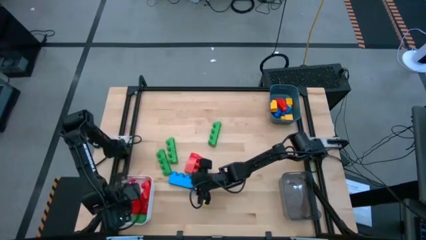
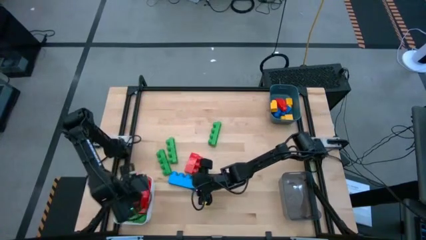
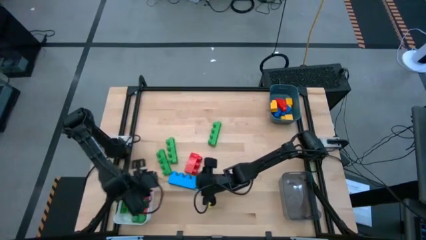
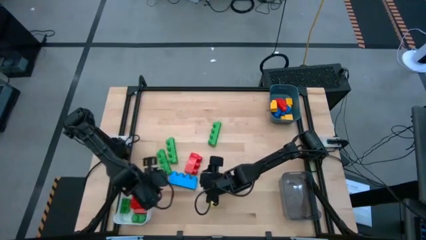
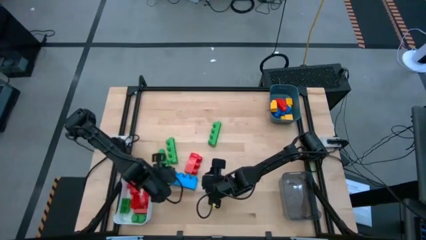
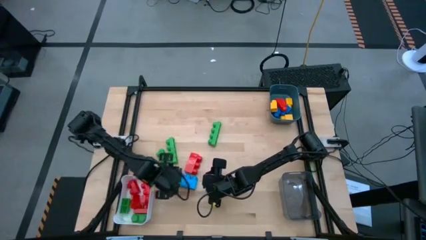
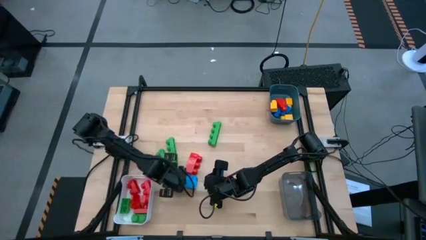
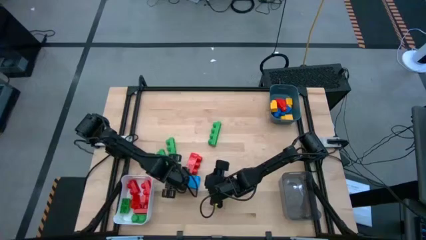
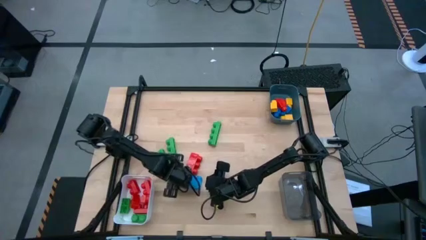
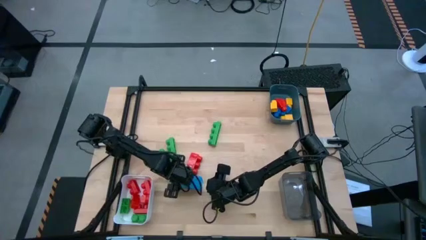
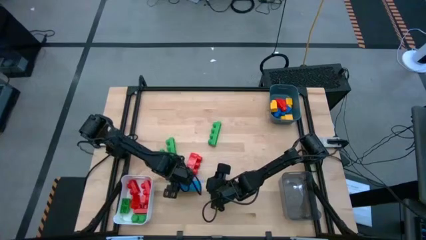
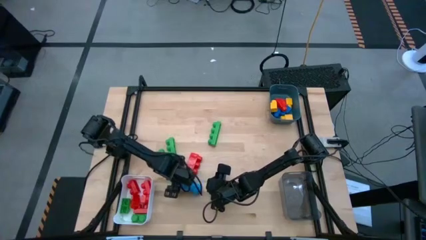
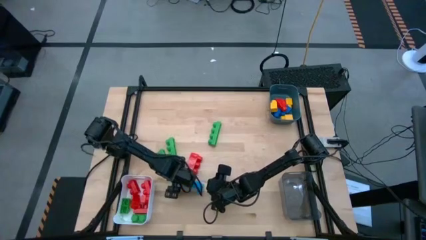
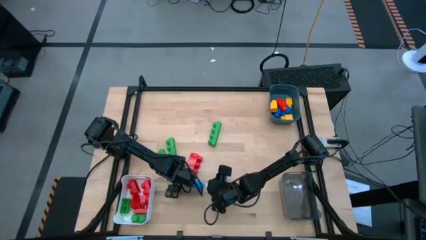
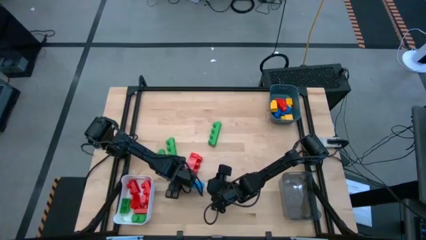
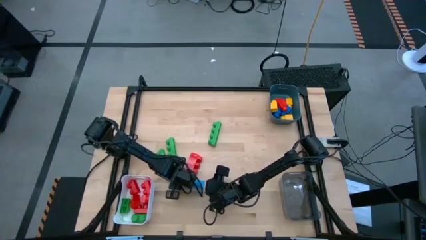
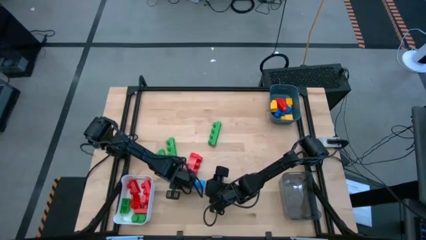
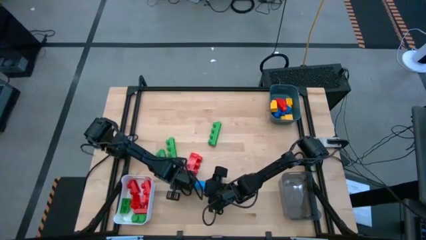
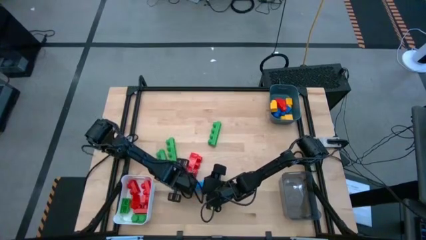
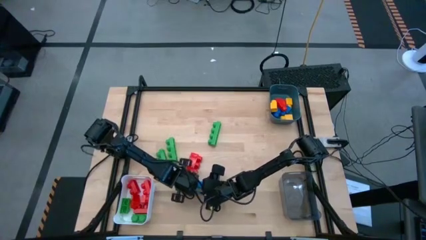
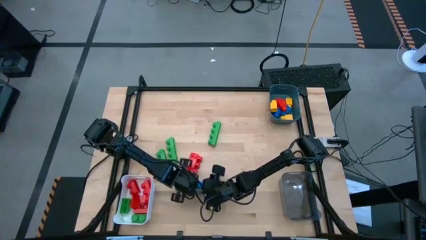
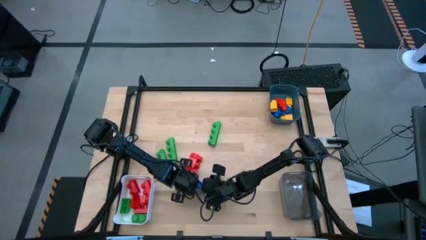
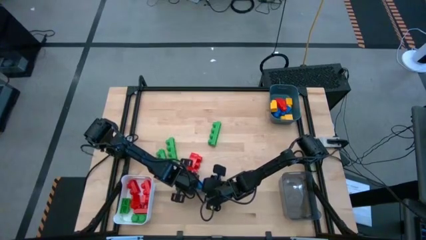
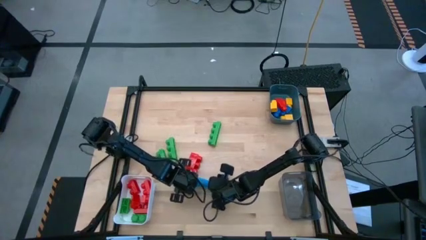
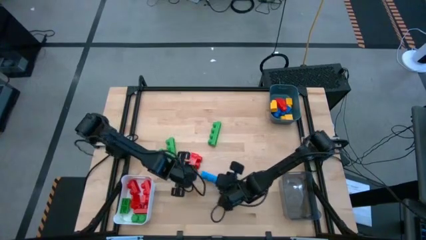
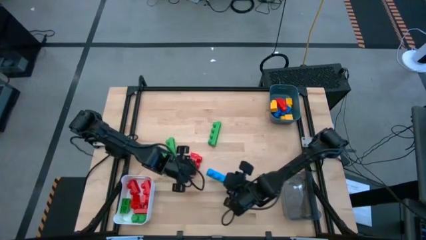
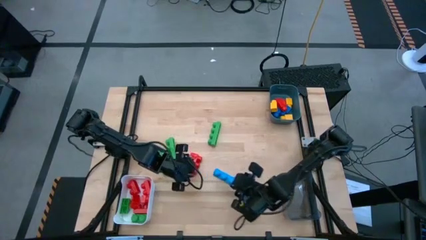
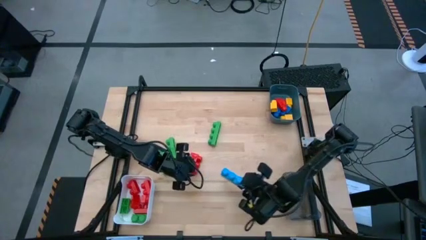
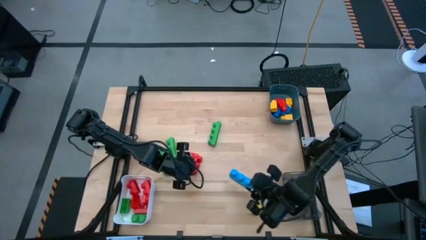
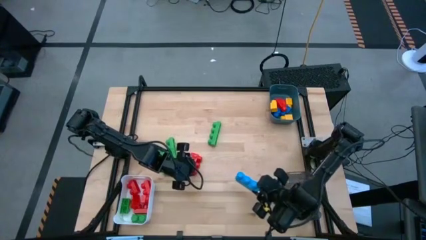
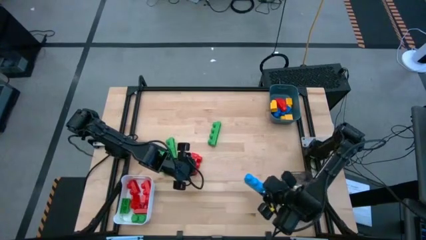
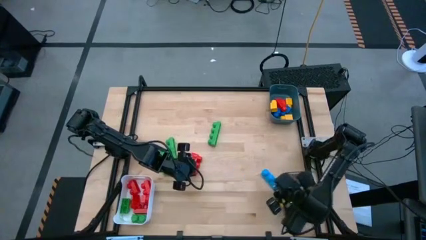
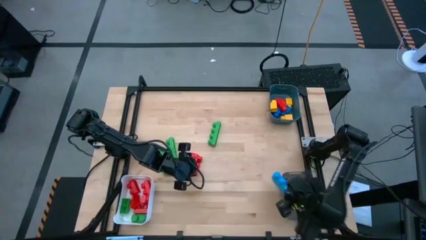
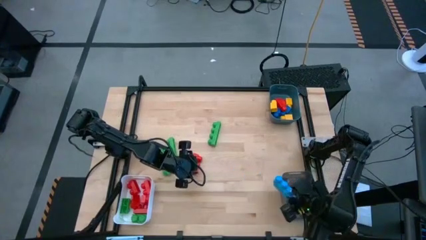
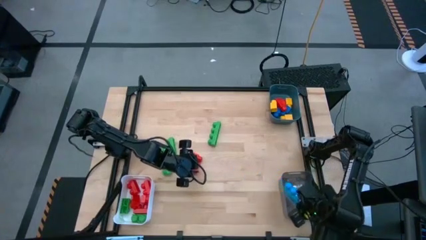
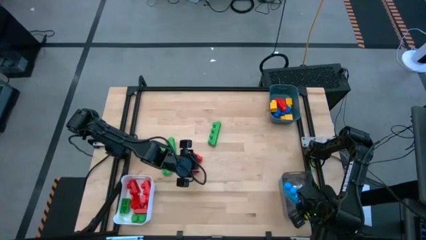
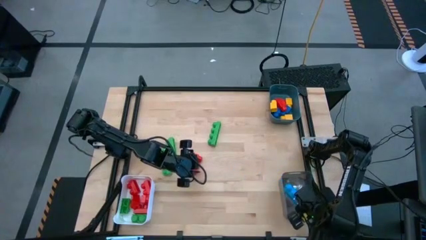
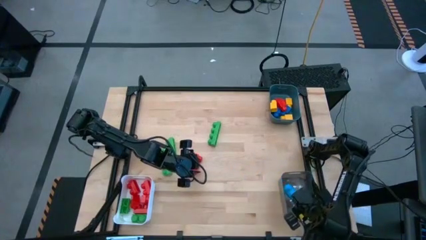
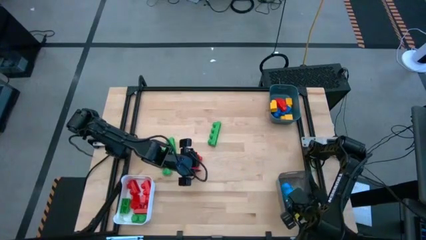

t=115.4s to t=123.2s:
Task: Sort blocks by size
Put the four stud blue game piece into the transparent black bin

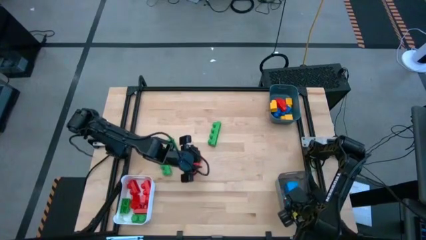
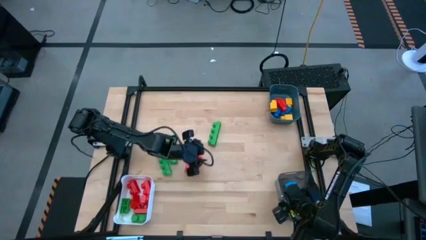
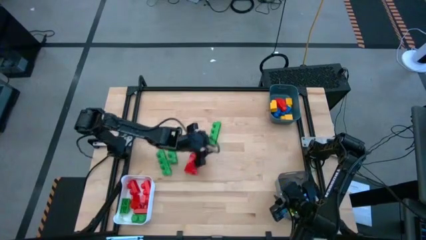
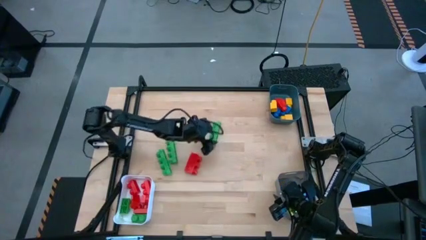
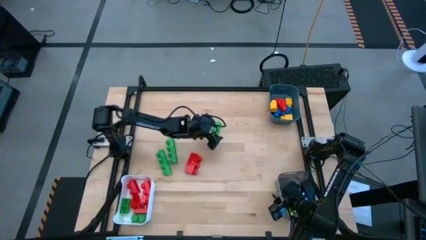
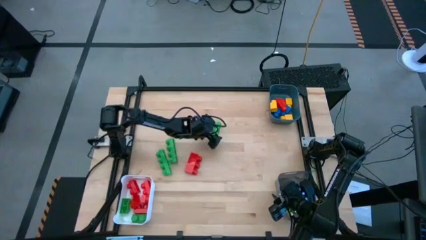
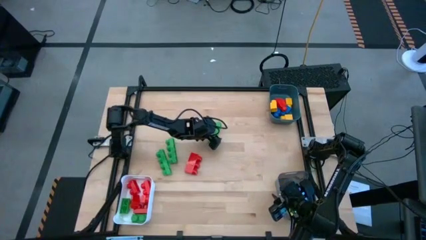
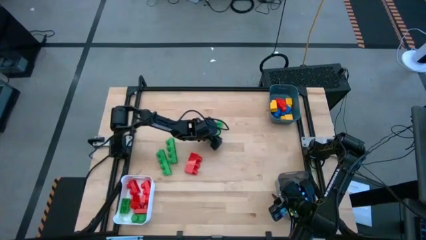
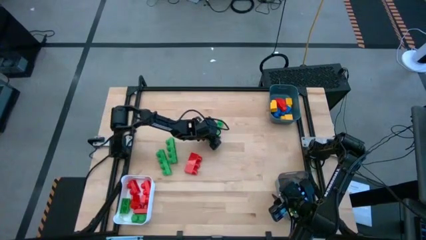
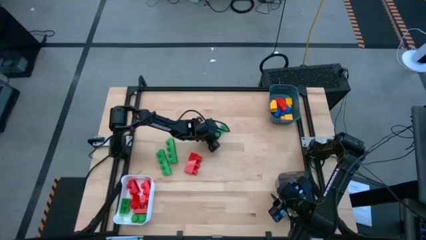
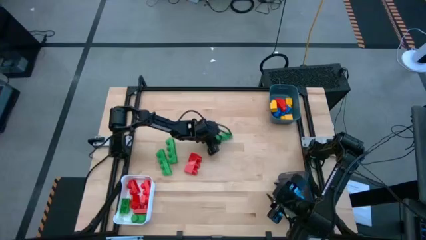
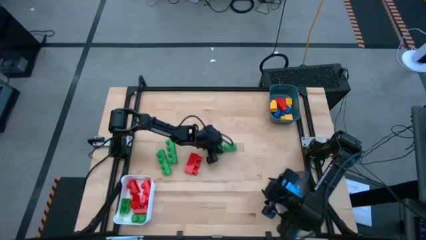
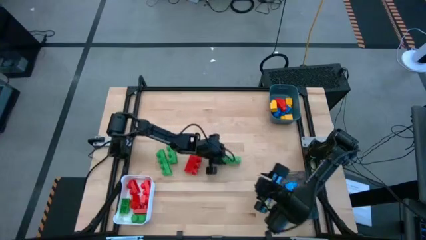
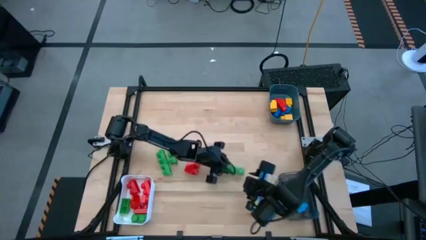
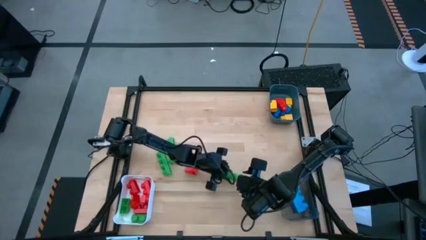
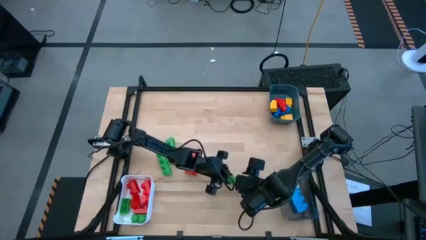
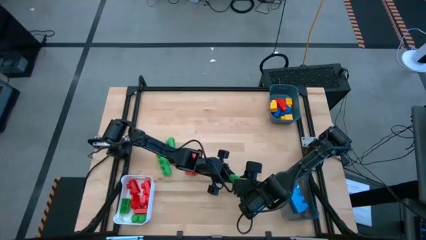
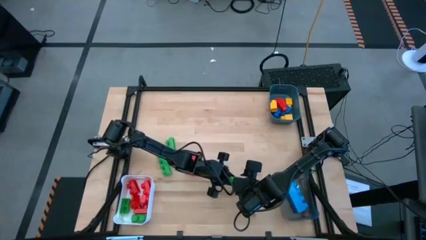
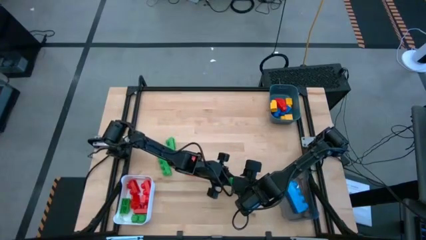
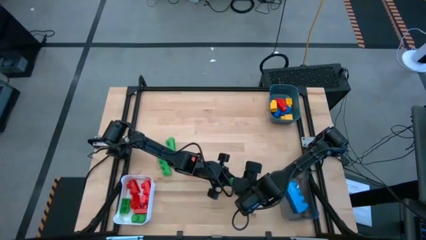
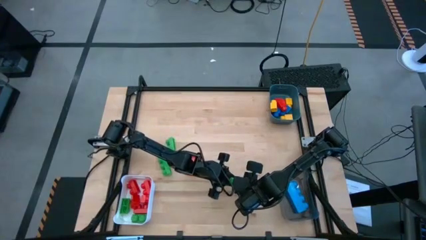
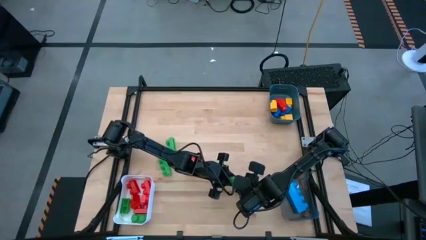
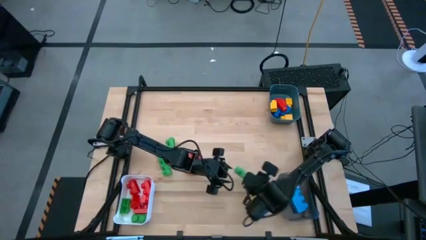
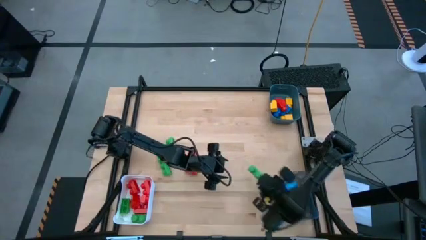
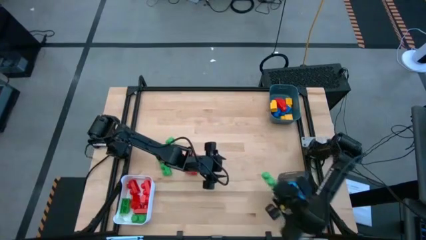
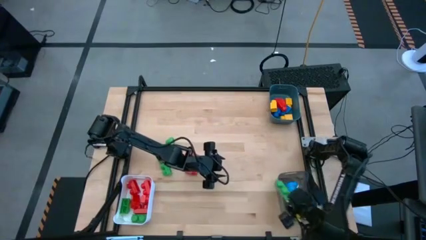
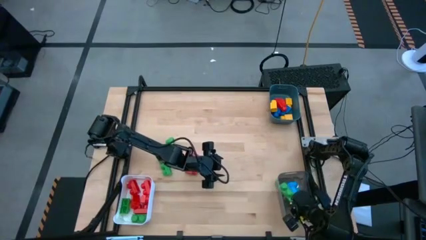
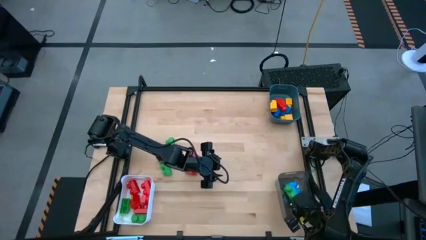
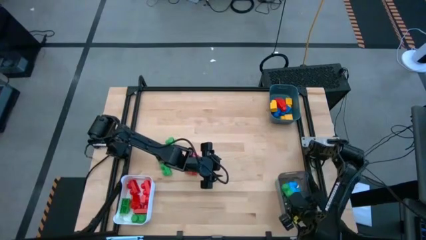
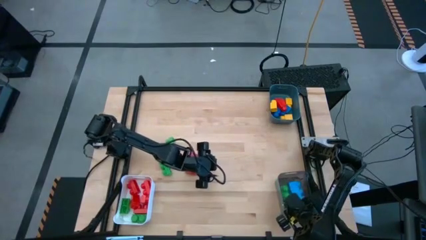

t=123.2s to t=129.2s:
Put the four stud green game piece into the transparent black bin

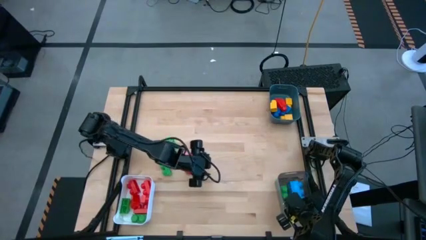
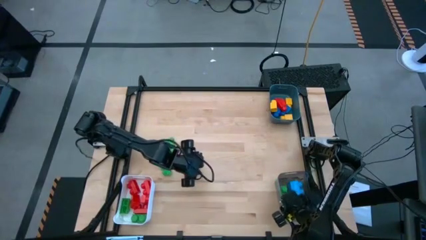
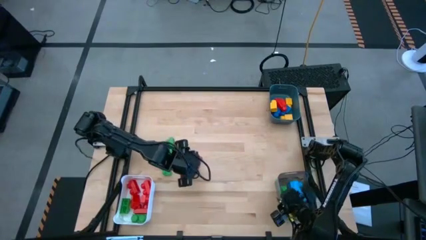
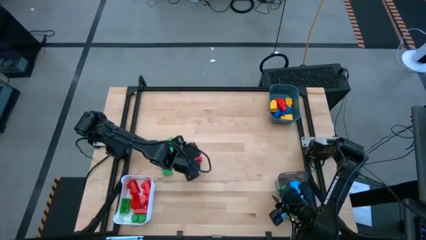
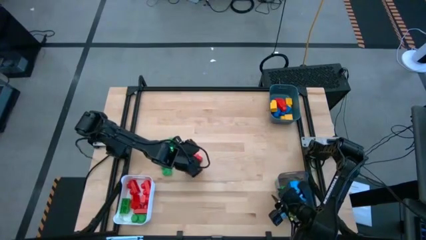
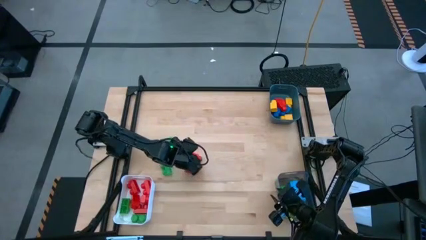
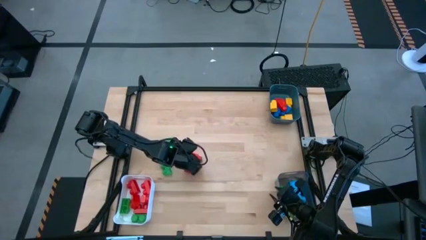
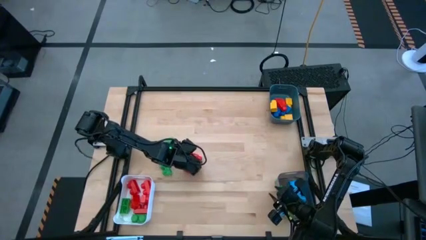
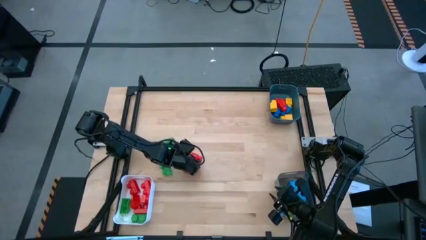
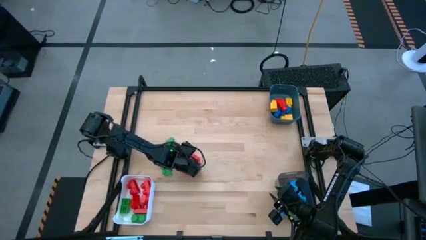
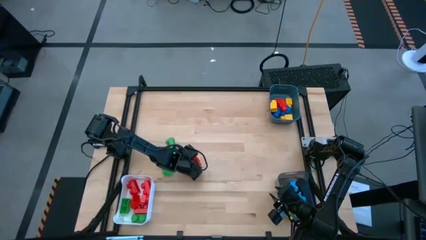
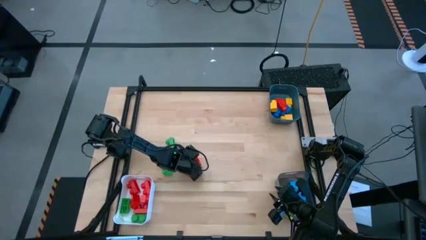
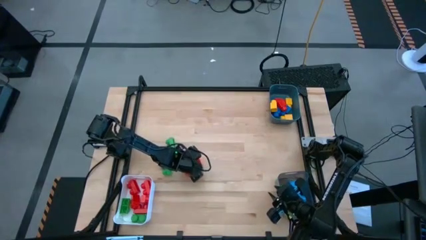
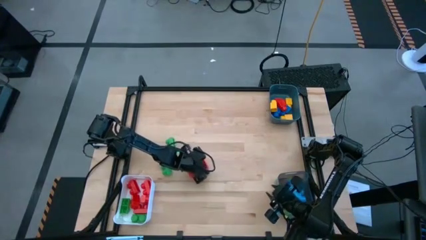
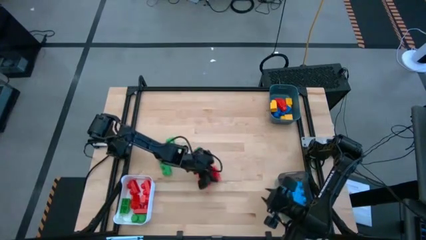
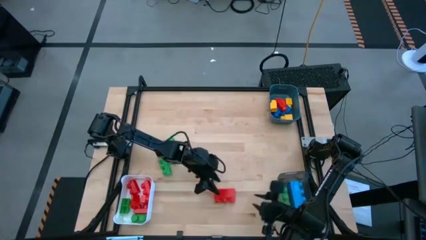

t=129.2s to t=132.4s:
Put the three stud red game piece into the transparent black bin
